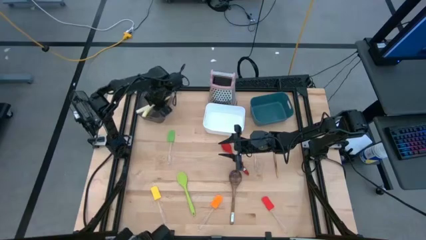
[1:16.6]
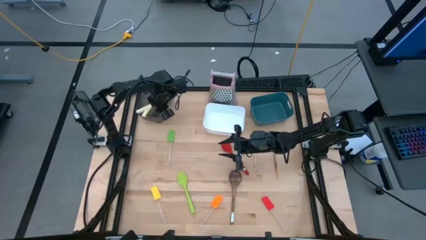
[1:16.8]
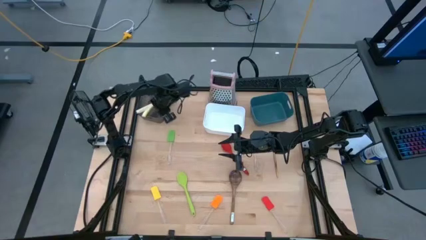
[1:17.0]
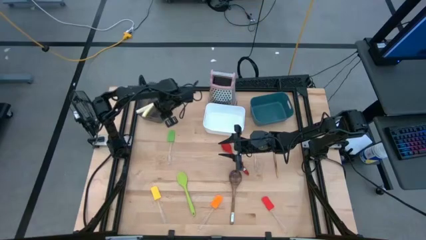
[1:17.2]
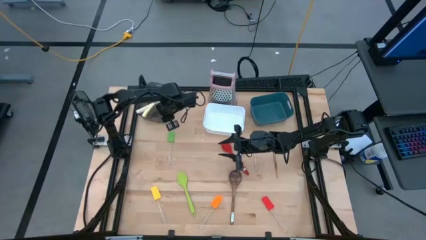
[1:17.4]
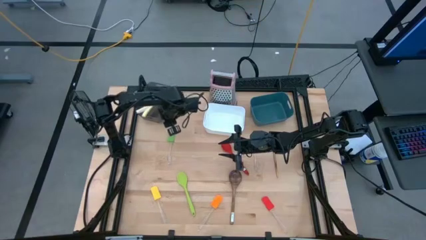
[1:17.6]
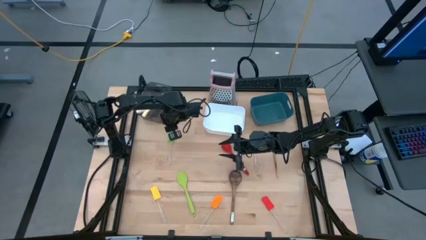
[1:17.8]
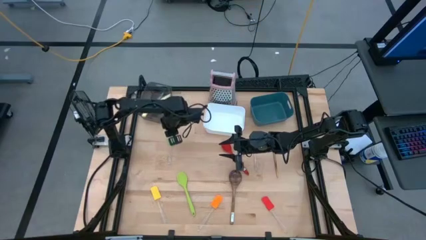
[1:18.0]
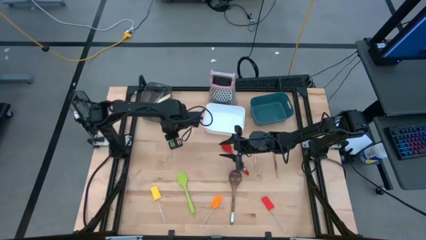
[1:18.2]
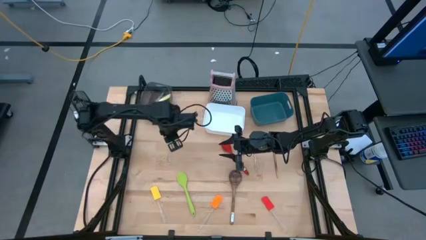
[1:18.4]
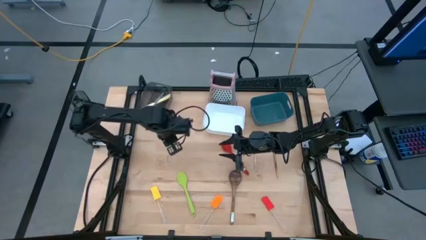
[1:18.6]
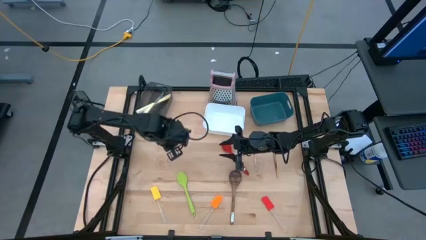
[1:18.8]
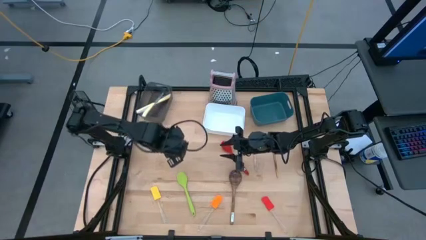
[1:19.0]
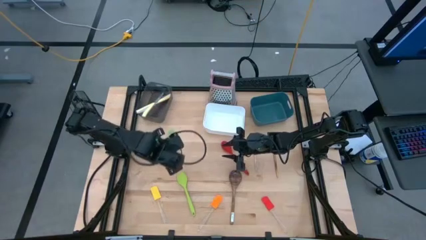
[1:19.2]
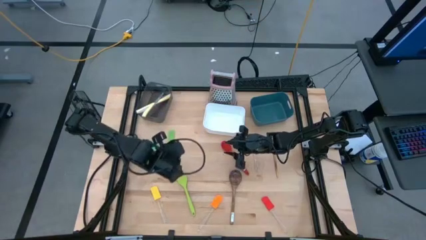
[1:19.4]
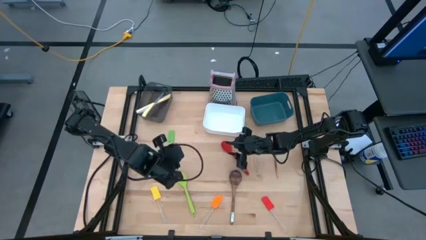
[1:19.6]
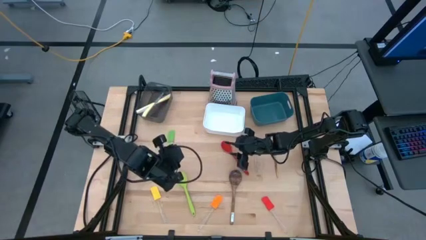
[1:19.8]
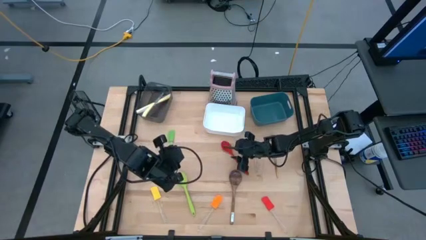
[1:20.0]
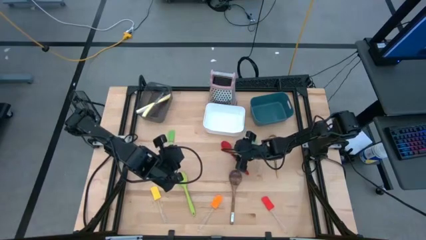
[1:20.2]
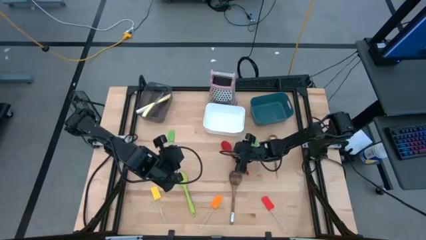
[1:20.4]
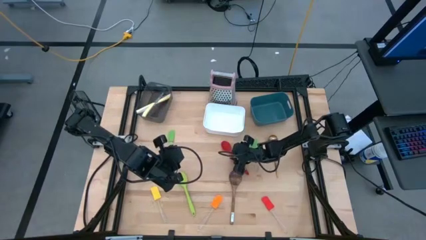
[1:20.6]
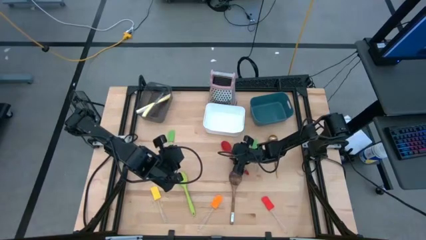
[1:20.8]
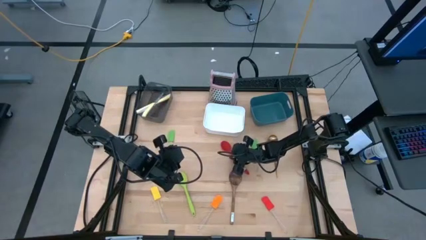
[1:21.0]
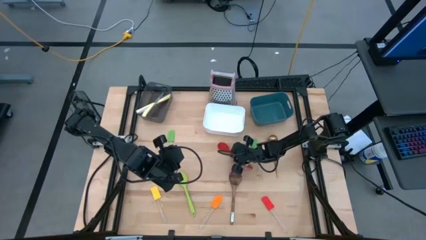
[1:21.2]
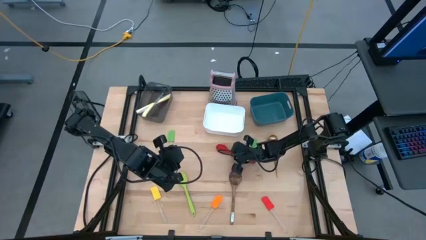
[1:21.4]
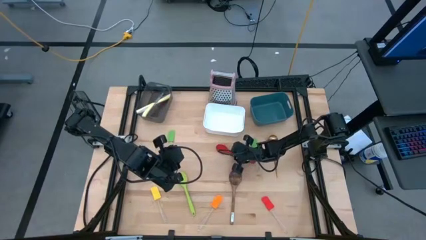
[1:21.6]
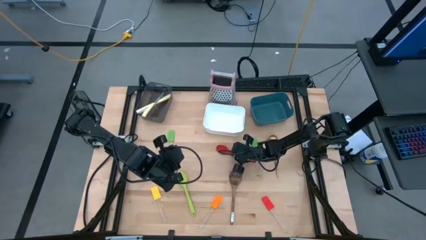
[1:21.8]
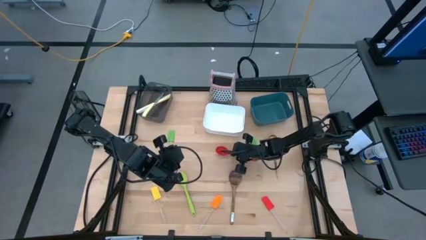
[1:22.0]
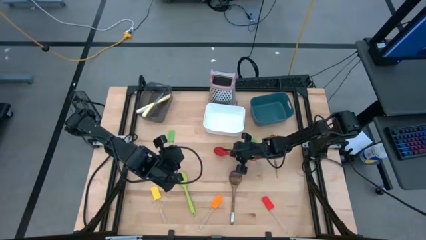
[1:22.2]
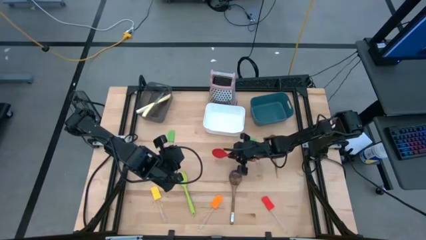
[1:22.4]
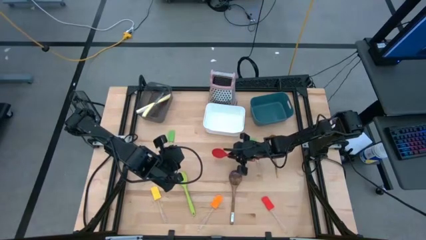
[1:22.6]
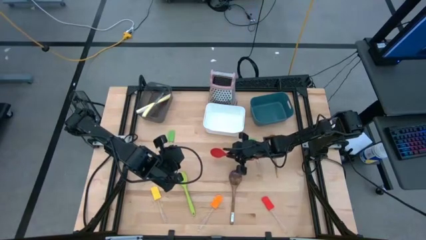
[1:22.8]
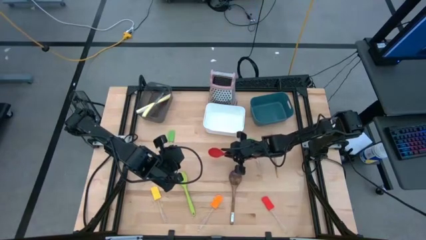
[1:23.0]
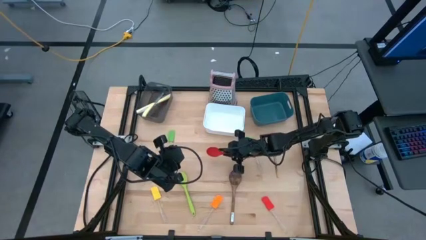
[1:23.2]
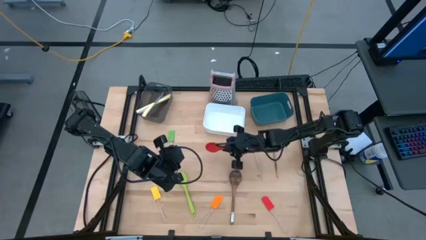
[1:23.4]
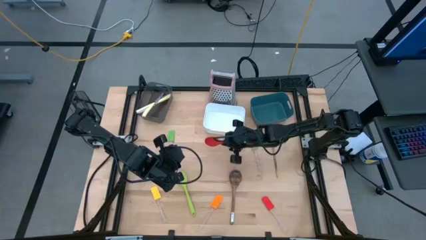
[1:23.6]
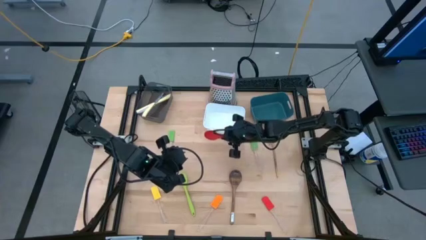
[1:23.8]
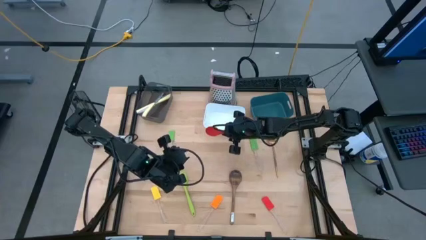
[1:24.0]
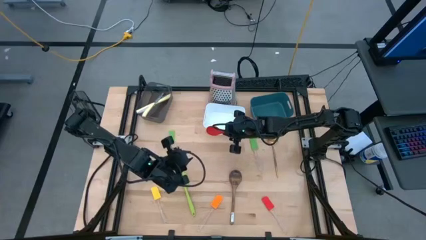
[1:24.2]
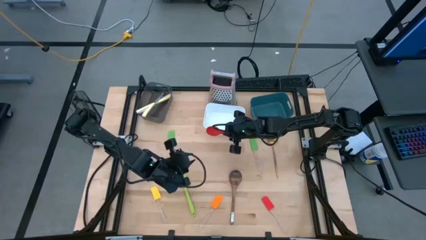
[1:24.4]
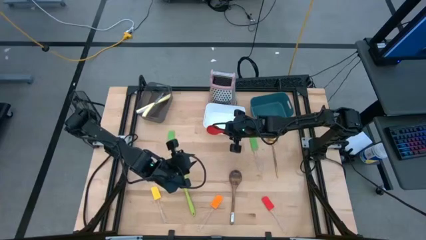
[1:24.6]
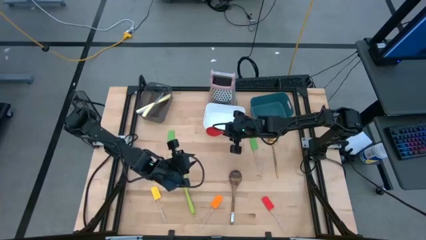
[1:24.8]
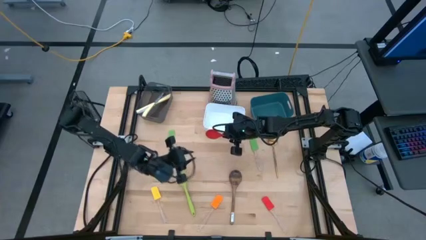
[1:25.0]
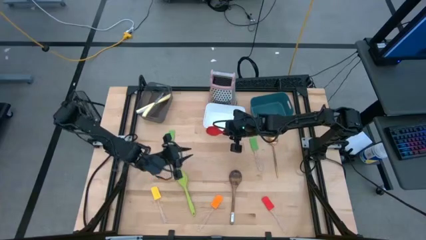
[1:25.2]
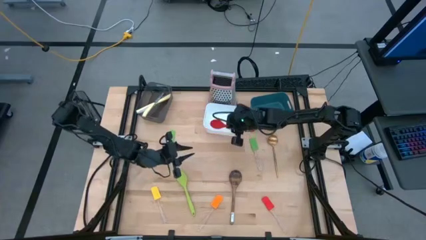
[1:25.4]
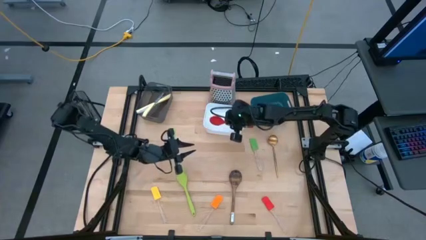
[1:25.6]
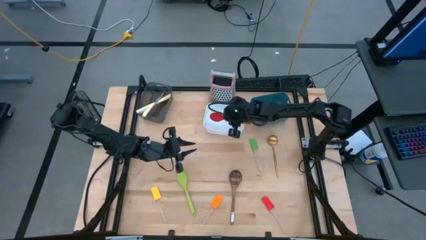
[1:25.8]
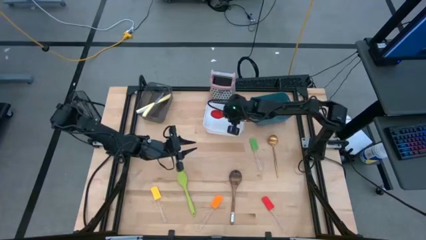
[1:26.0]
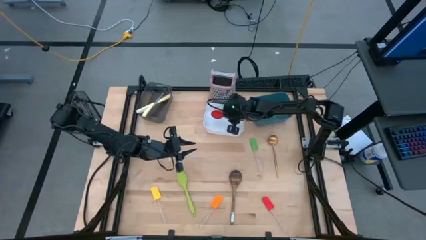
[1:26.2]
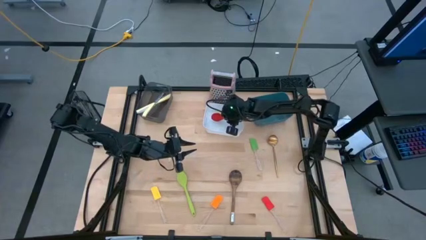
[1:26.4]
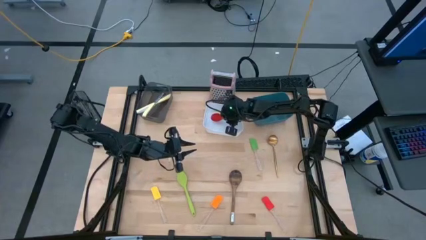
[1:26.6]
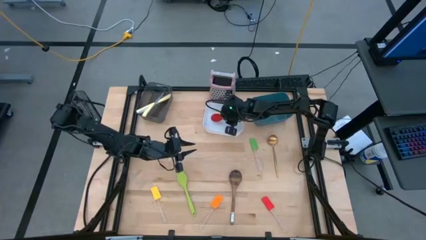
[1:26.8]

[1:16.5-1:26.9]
Task: Pick & Place Kitchen Items
Put the red spoon into the white bin

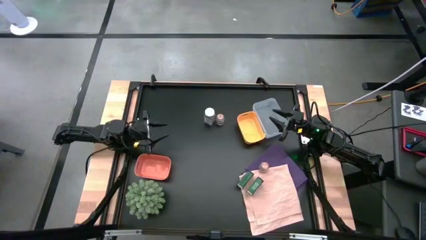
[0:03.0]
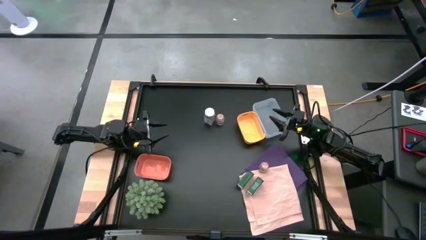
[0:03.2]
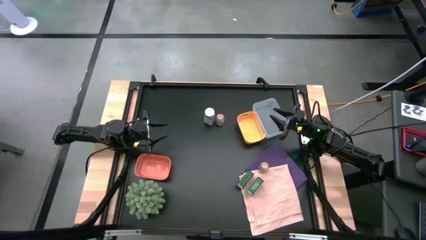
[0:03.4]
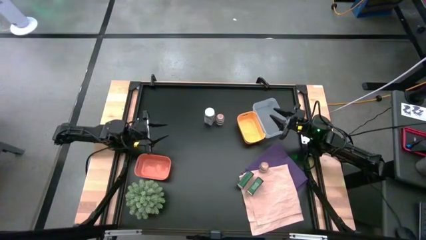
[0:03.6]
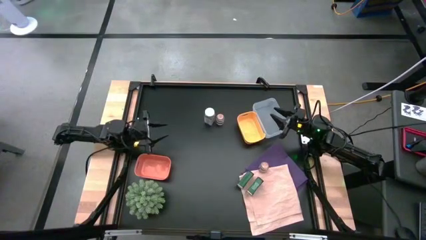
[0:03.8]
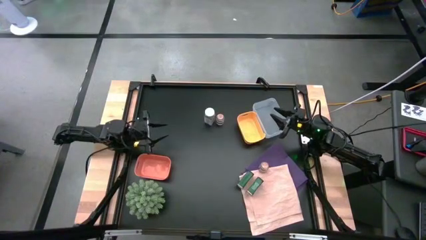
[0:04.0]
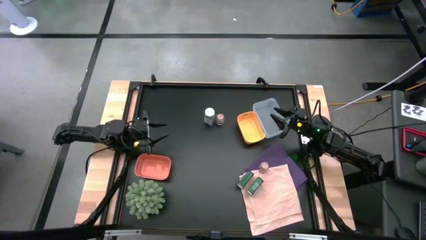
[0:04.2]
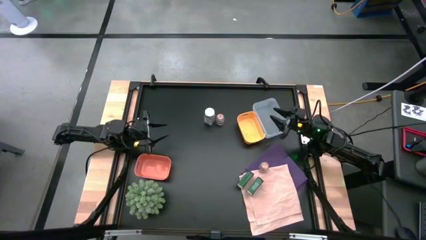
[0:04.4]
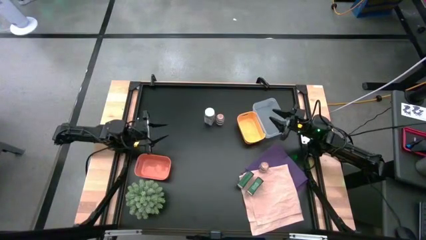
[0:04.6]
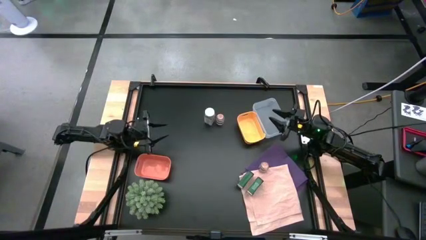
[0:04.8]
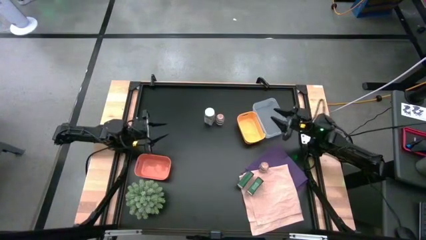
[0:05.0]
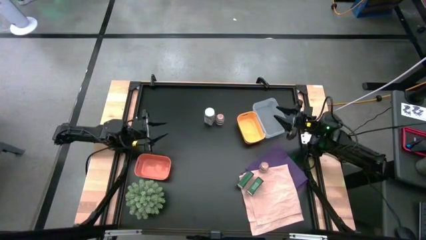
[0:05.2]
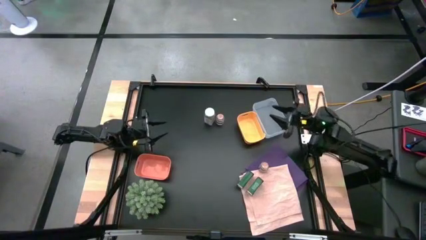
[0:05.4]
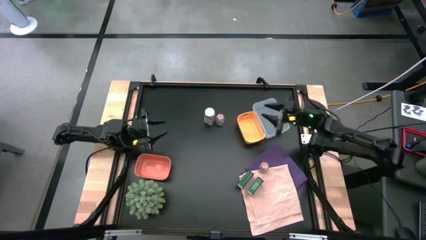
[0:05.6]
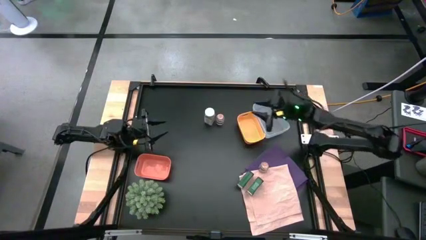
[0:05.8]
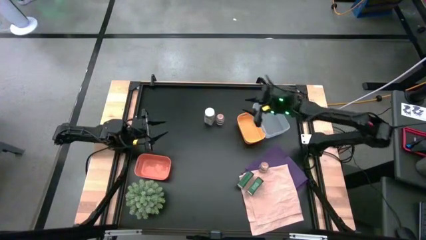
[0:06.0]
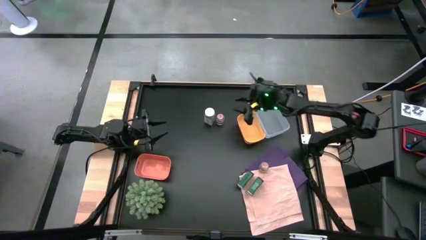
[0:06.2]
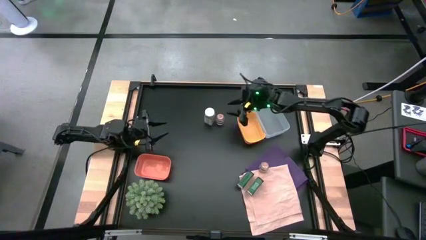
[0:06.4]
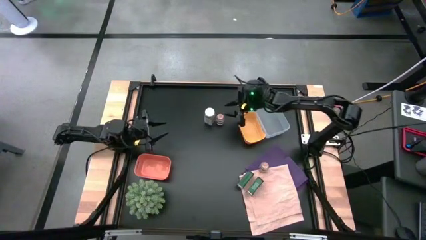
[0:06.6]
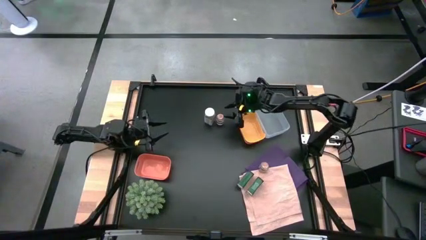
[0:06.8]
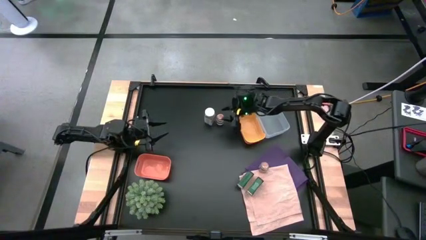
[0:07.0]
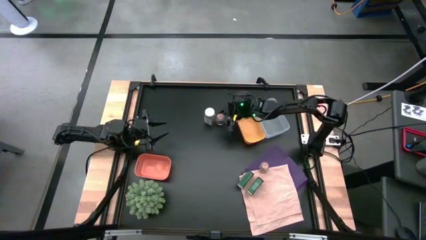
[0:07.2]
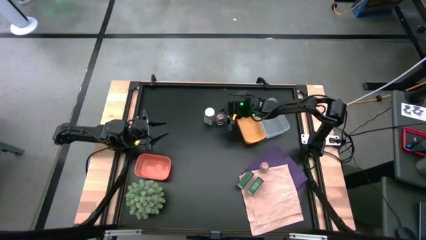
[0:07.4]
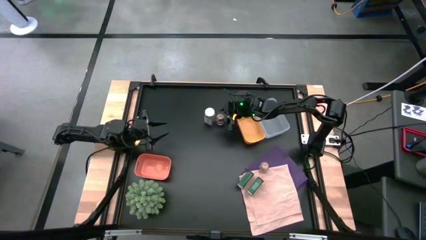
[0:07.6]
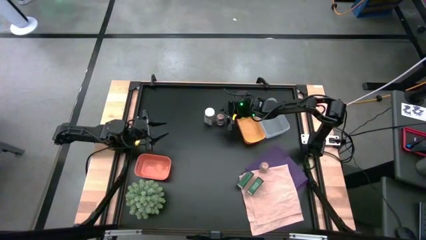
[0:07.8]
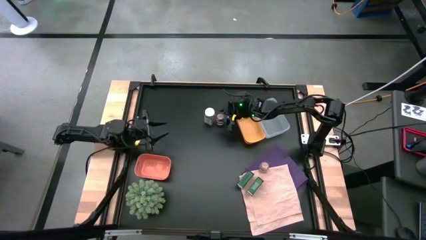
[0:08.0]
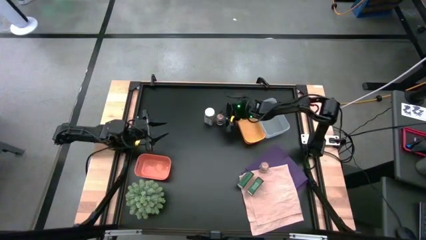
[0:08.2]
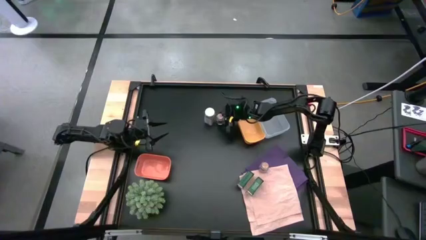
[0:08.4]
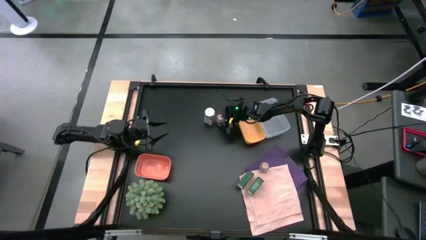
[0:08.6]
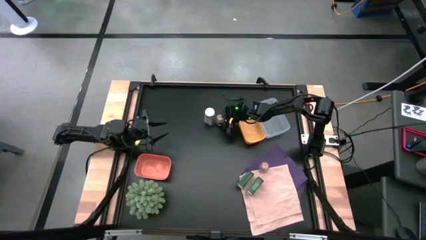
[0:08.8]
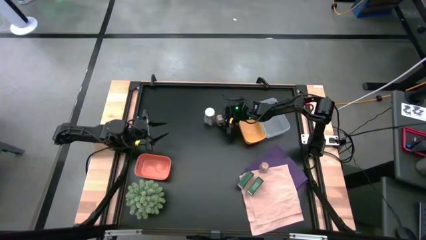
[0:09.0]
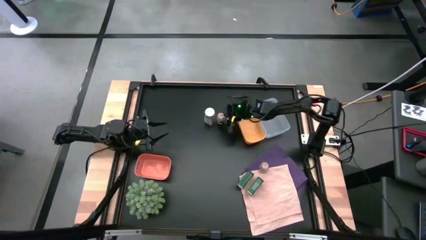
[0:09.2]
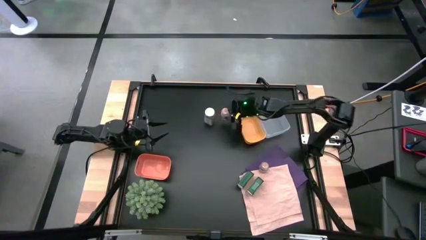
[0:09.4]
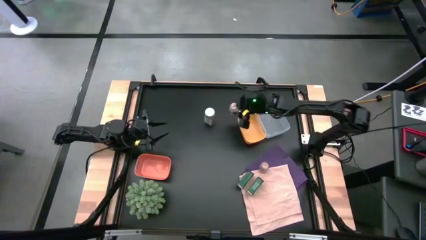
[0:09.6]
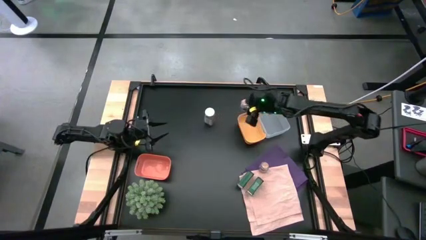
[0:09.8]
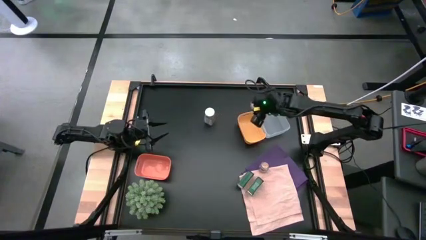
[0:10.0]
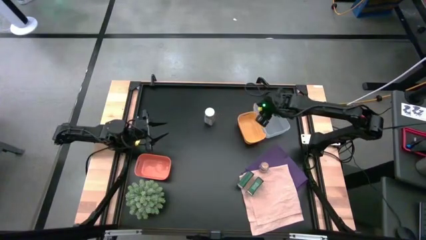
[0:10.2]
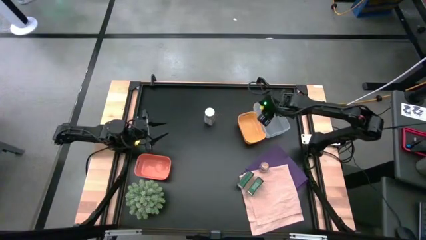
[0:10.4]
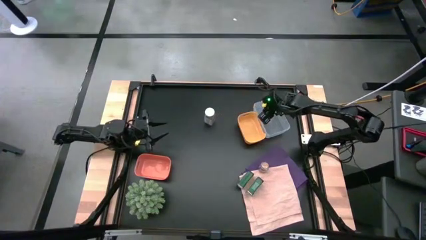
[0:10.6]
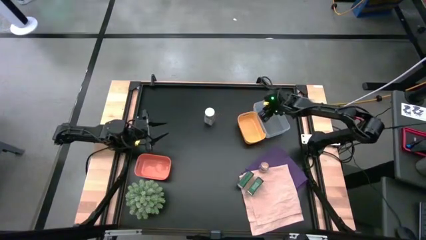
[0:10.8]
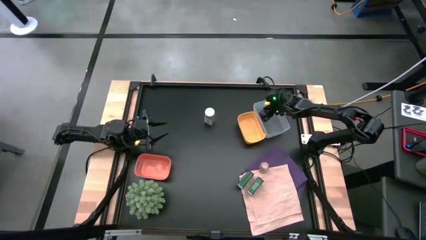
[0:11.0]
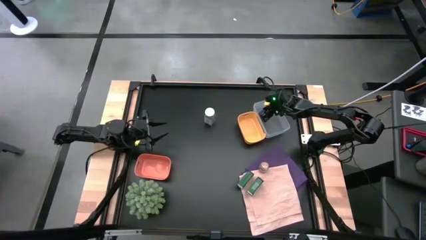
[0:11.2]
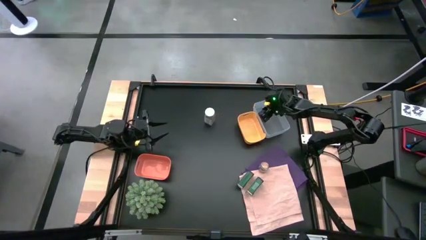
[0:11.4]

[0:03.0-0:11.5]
Task: Sort spices by type
Put the top brown seasoning bottle into the transparent bin
